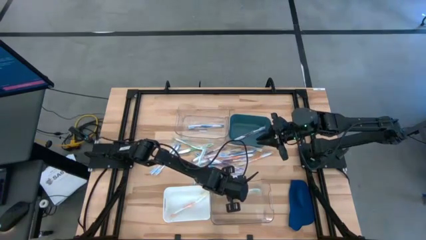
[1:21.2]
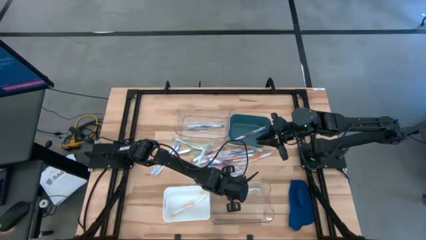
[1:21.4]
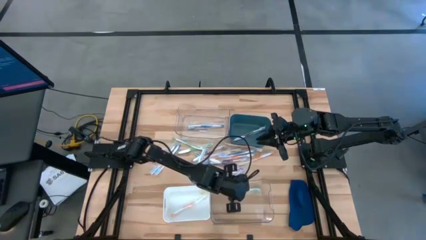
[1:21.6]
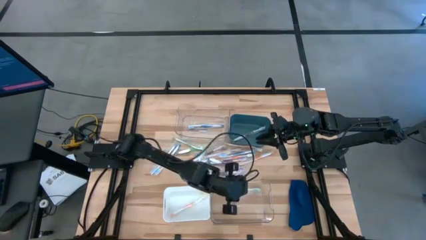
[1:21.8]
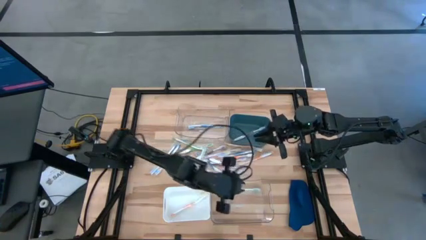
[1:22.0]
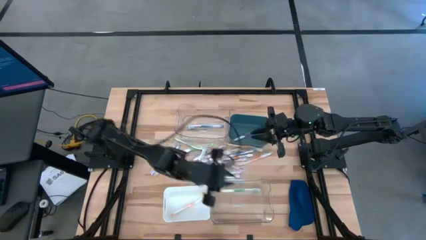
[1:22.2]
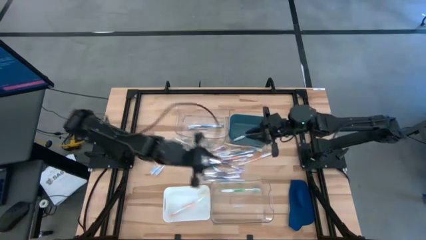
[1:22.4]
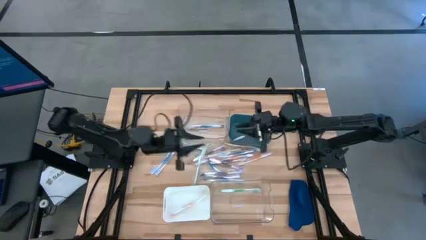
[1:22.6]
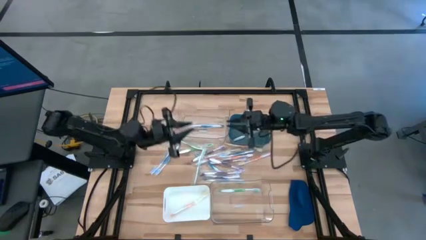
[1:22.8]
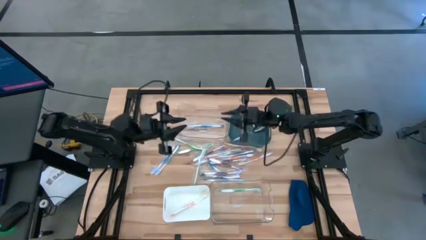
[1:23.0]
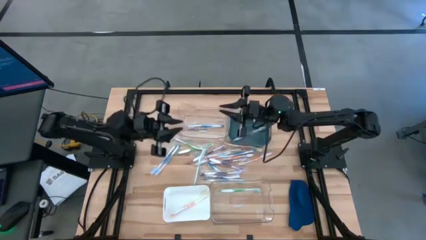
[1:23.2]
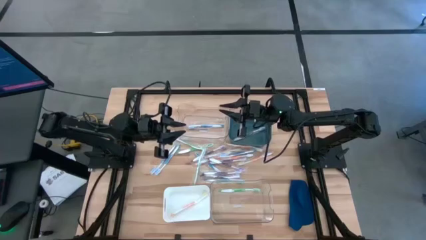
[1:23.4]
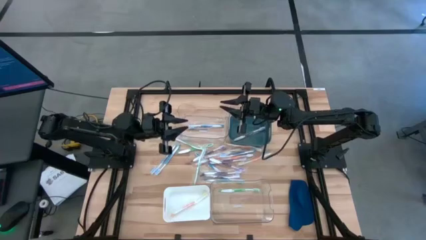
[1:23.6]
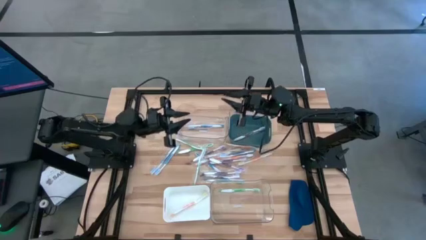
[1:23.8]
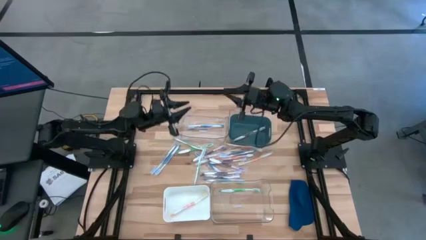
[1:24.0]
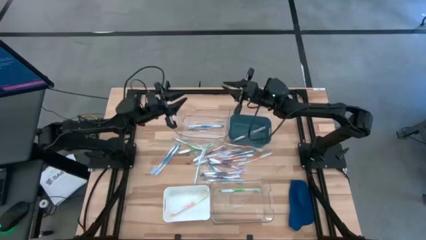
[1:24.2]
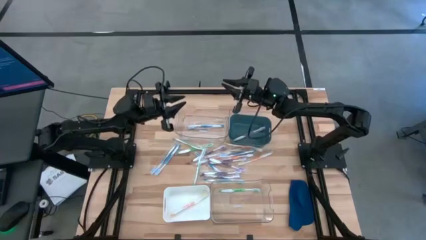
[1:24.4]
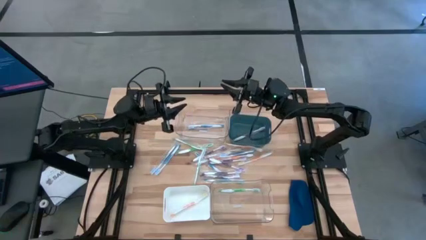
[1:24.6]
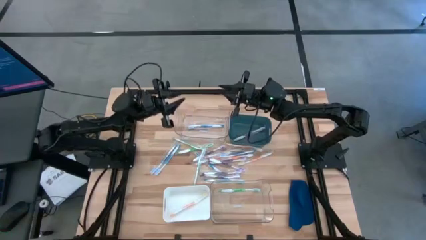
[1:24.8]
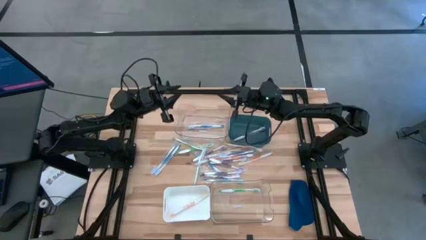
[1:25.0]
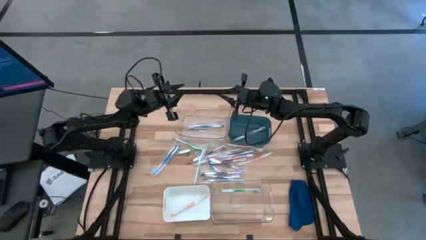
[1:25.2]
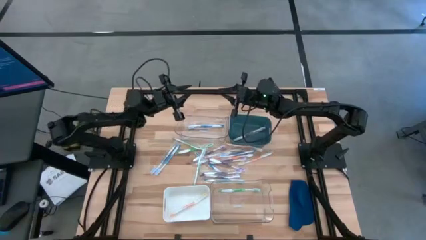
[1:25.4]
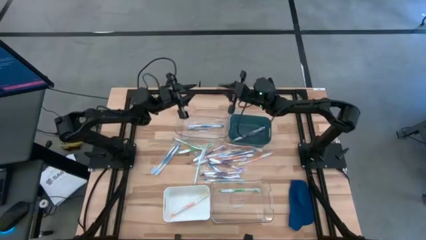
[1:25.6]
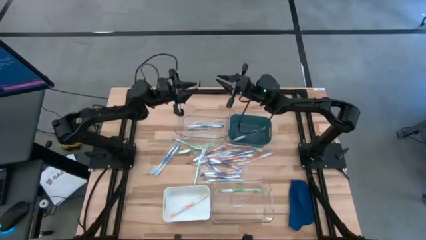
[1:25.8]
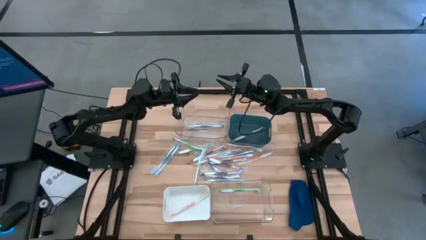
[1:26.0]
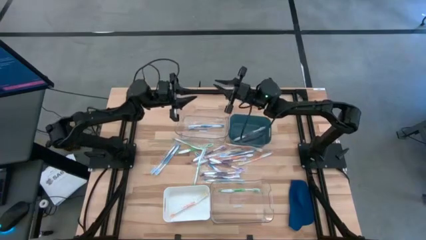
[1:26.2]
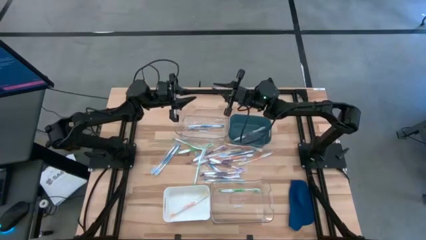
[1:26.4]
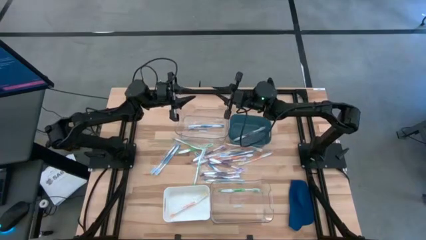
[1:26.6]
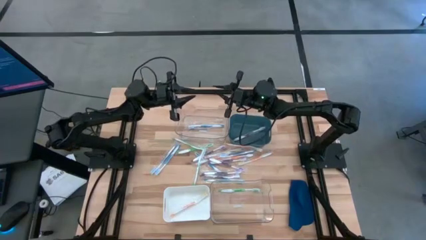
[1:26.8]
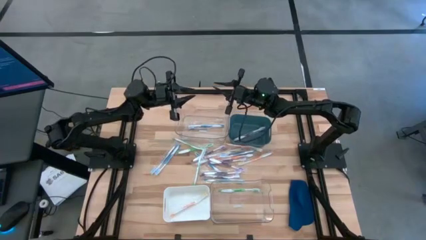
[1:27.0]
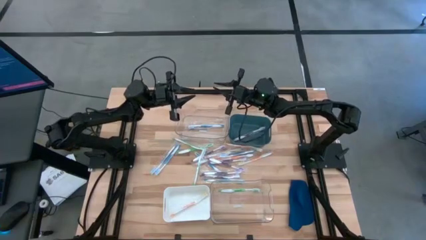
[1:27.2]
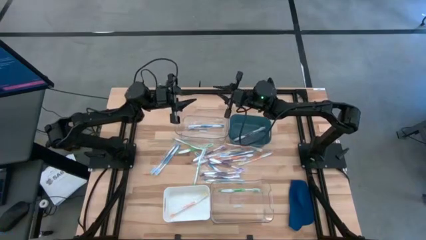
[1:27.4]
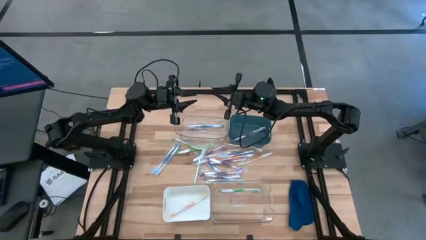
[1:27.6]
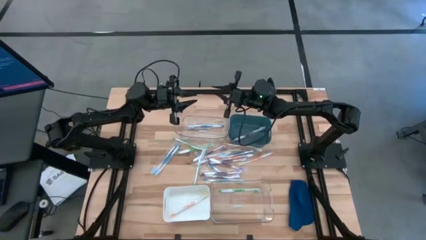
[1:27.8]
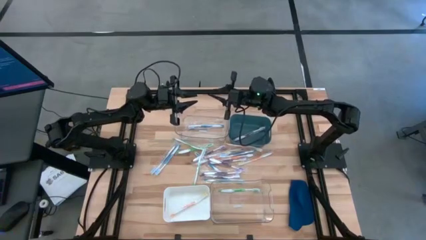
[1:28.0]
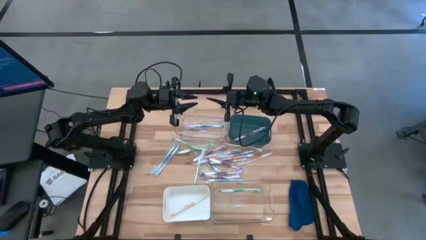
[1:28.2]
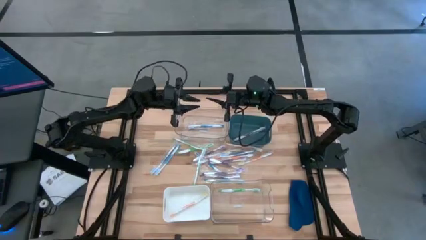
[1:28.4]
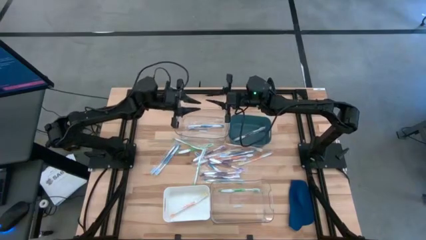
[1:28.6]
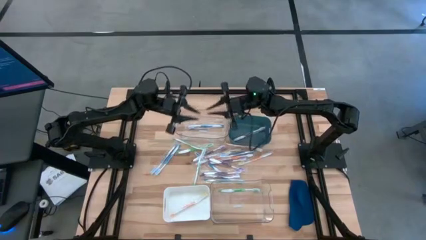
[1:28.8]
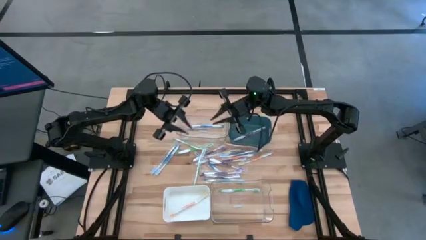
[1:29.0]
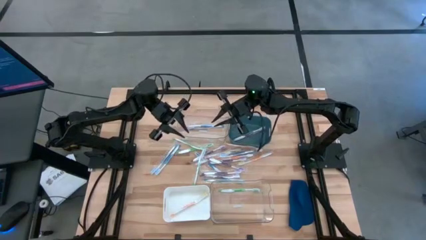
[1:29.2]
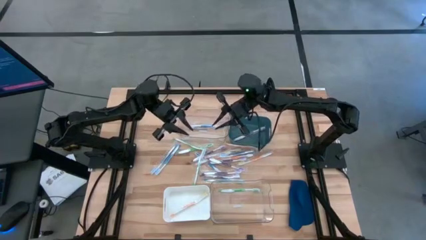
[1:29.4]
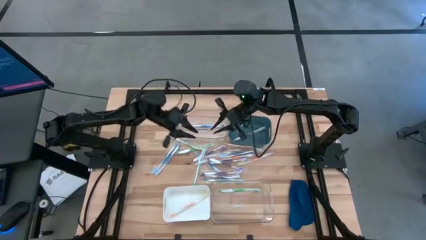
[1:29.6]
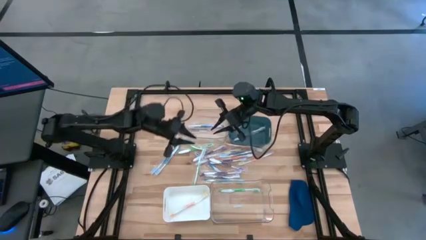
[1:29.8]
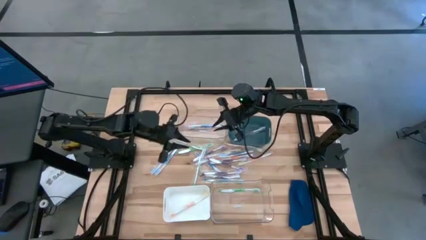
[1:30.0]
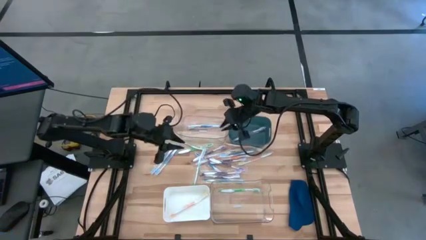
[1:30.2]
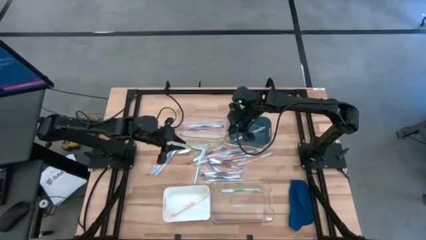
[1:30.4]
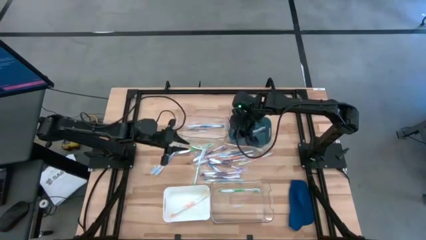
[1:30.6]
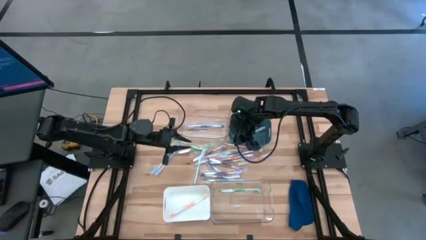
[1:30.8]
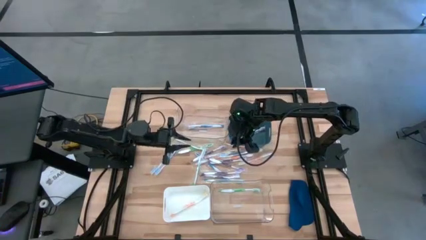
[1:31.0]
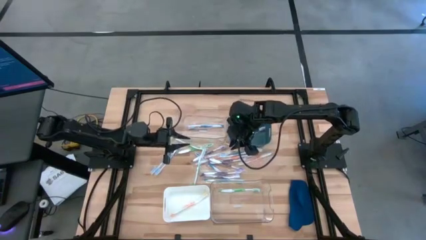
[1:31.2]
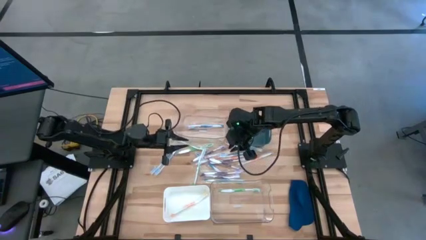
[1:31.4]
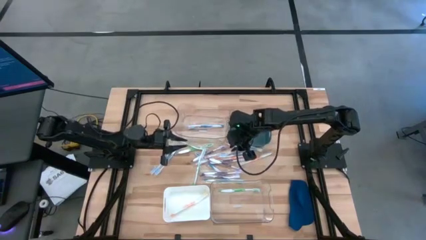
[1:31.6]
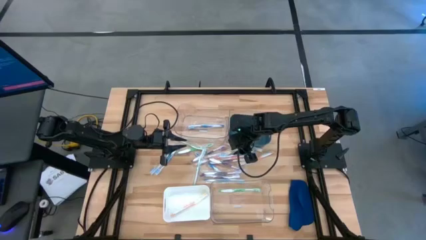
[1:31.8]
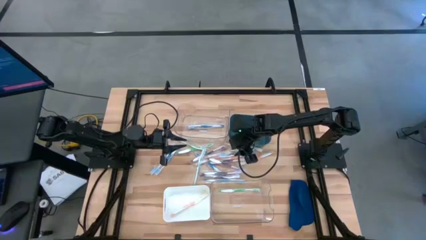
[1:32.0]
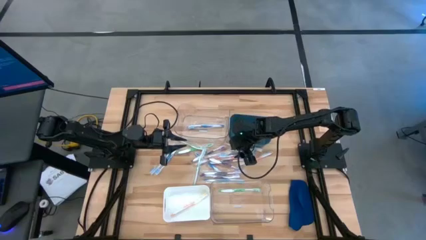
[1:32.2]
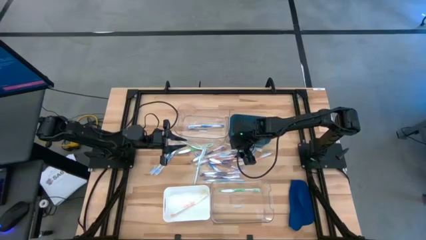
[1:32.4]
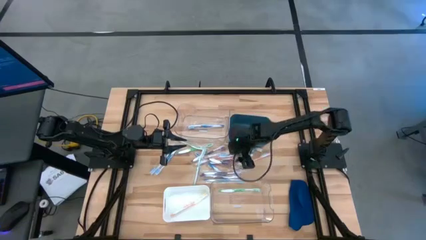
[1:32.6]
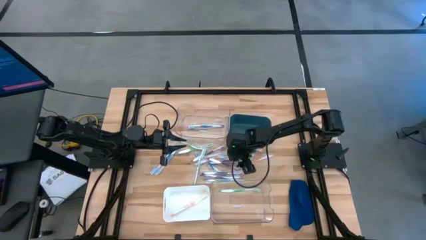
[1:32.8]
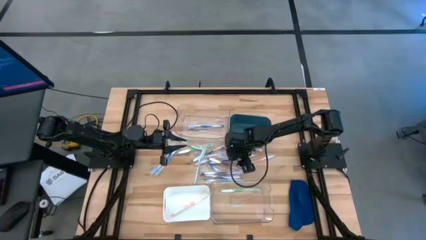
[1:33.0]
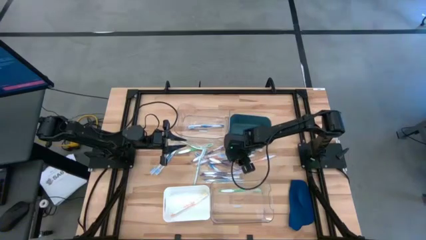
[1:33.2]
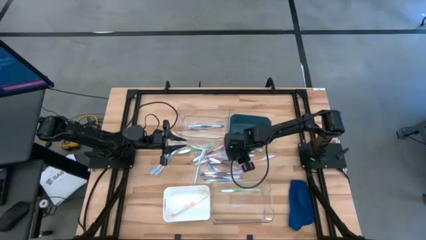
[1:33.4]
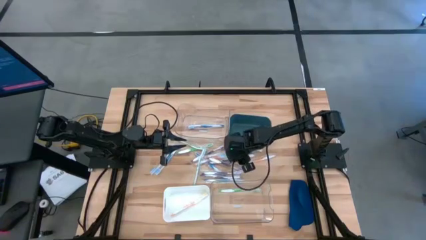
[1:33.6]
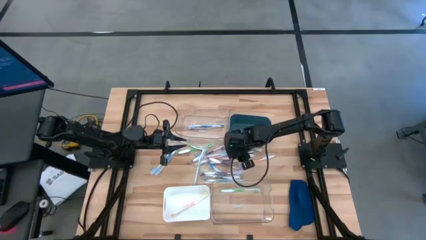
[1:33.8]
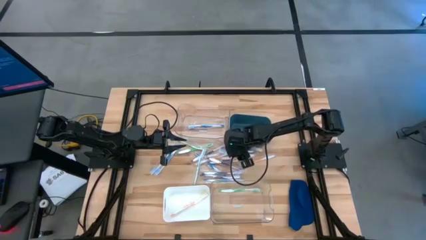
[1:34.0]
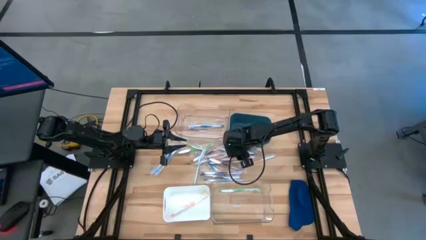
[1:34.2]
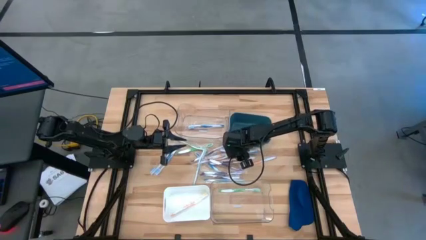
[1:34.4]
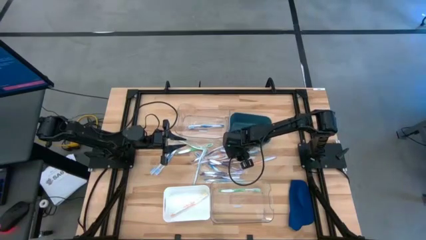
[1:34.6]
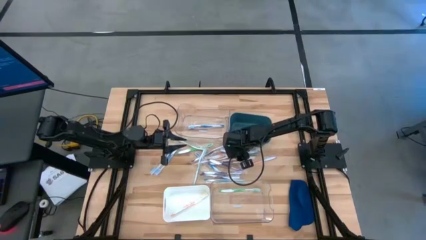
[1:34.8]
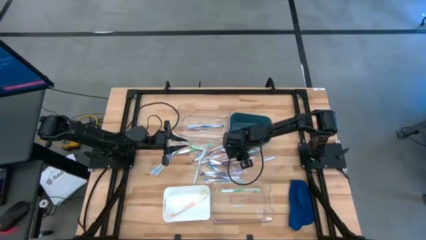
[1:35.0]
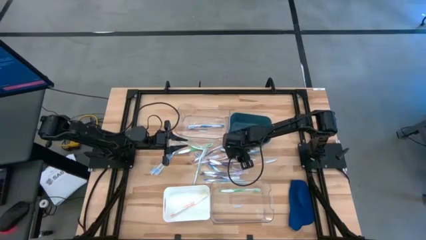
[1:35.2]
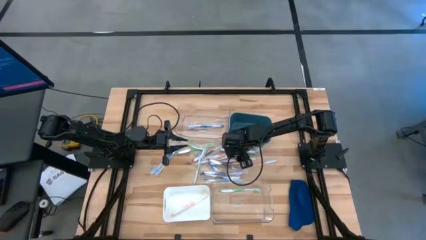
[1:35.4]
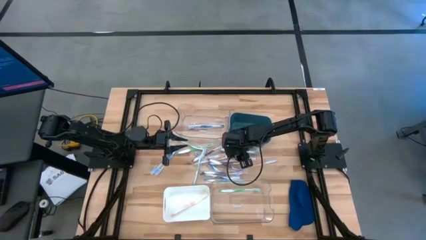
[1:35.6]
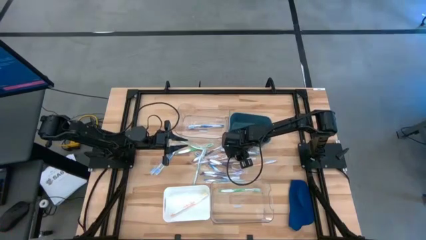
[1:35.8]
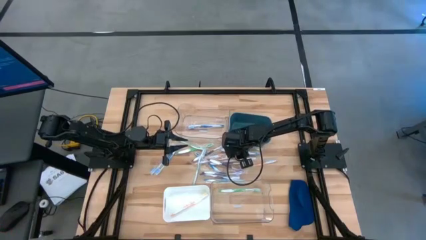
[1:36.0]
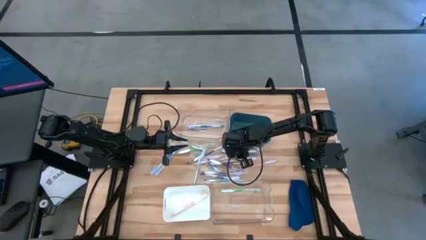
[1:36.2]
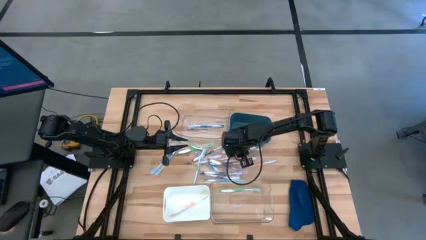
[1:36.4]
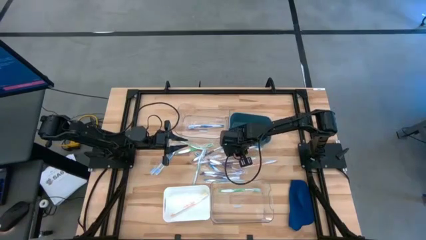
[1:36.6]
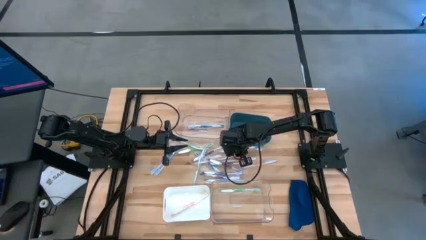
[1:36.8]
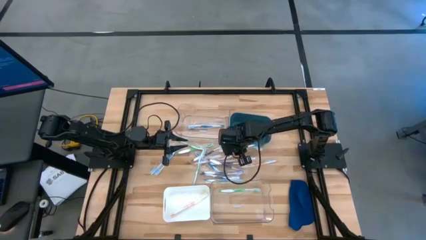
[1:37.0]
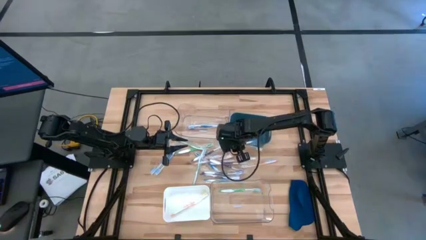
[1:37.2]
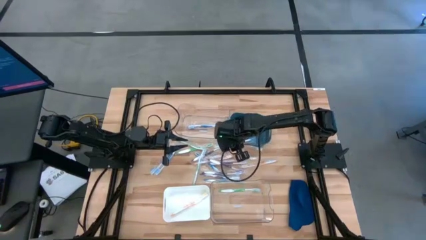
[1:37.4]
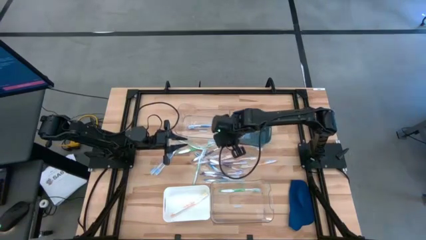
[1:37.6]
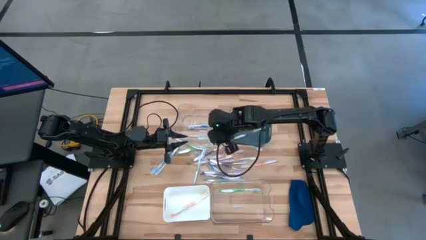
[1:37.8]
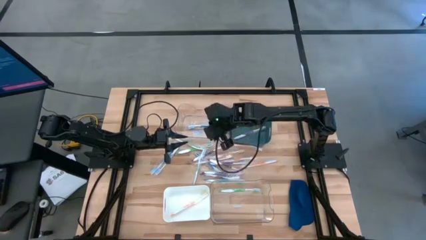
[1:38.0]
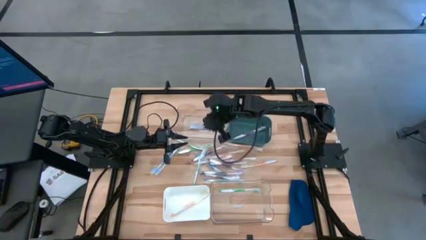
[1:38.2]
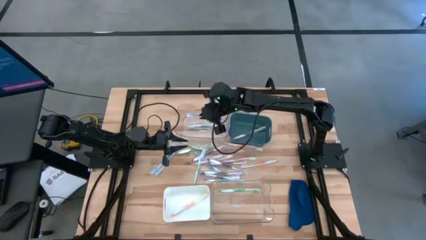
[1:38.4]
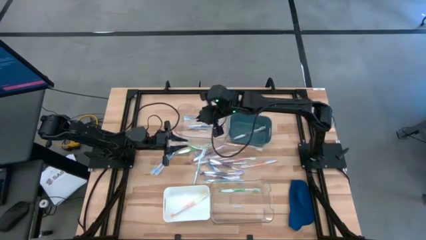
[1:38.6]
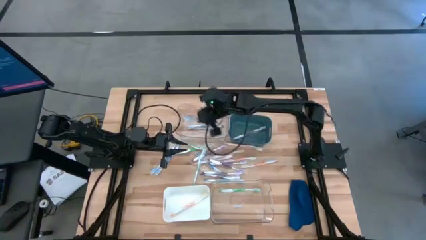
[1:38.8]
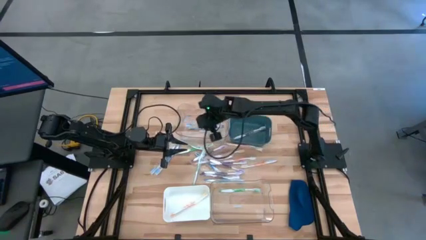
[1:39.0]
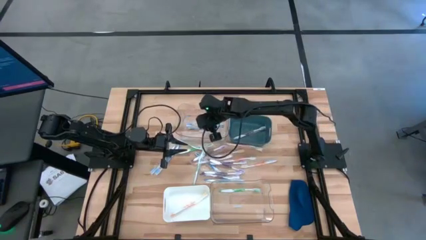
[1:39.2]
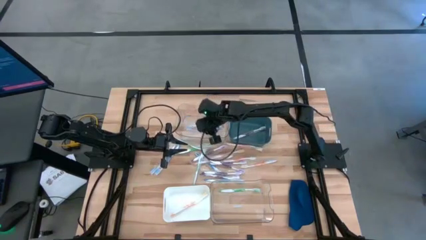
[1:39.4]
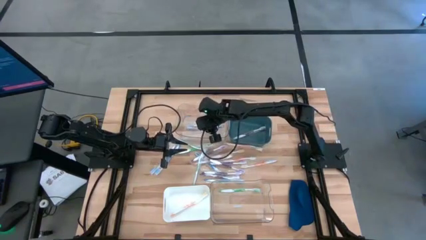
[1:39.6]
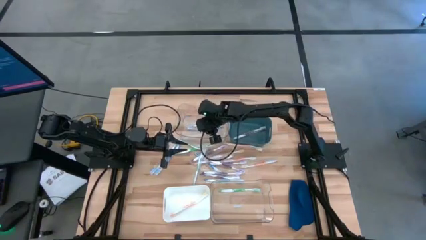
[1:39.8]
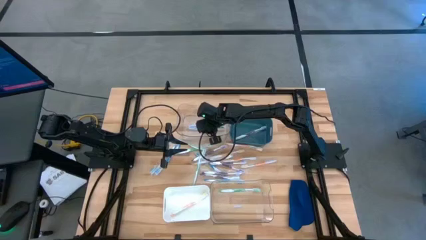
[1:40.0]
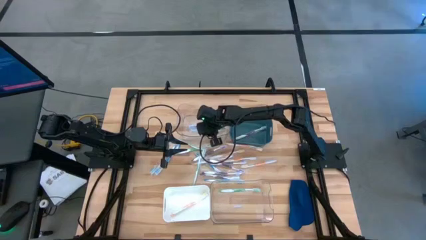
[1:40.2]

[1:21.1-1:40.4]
Task: Pick & Place Toothbrushes
Put the blue toothbrush into the top transparent bin
